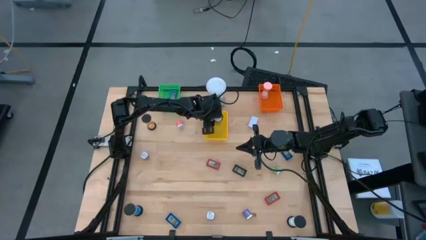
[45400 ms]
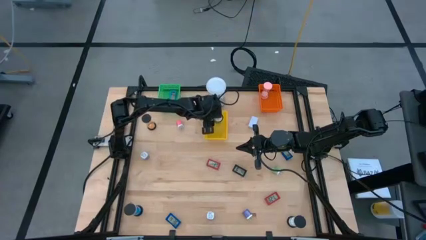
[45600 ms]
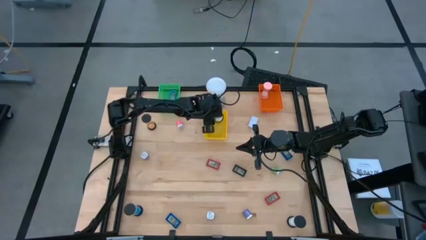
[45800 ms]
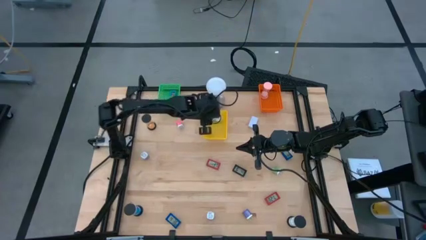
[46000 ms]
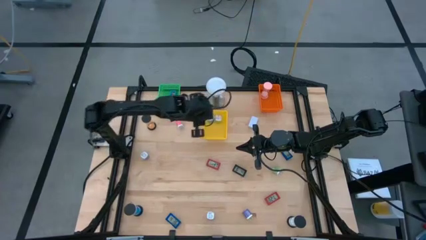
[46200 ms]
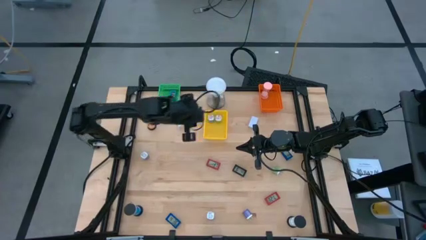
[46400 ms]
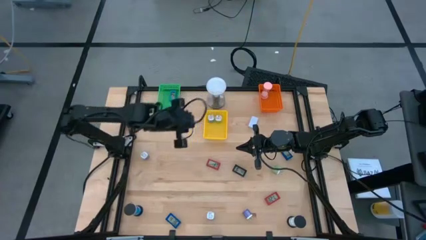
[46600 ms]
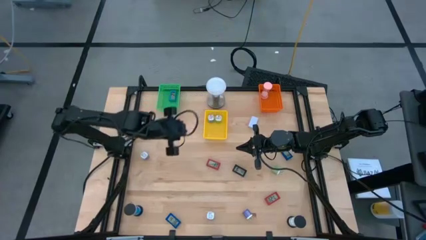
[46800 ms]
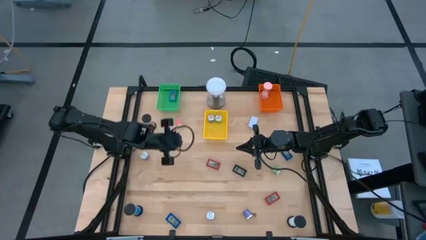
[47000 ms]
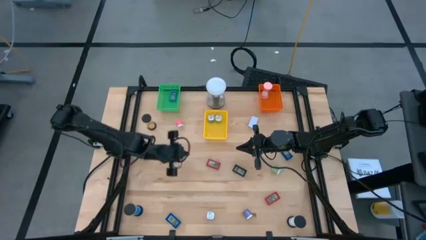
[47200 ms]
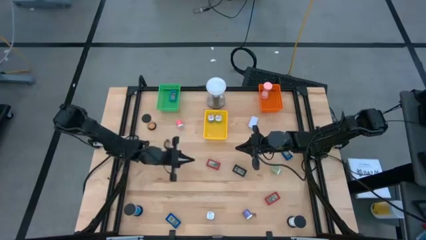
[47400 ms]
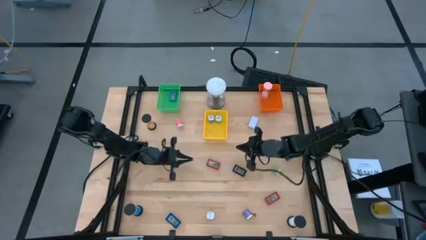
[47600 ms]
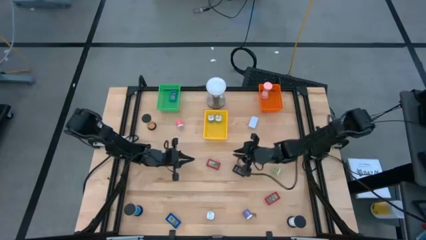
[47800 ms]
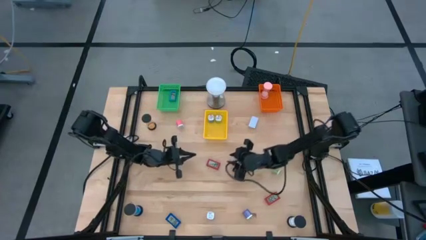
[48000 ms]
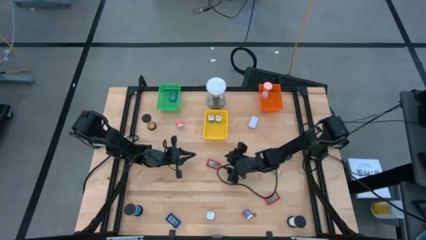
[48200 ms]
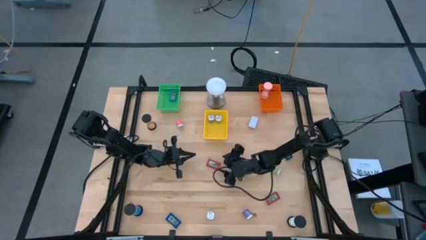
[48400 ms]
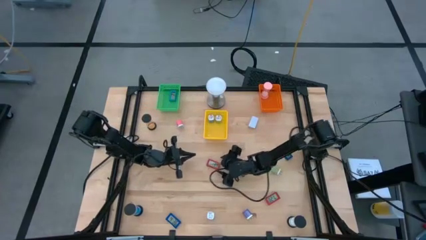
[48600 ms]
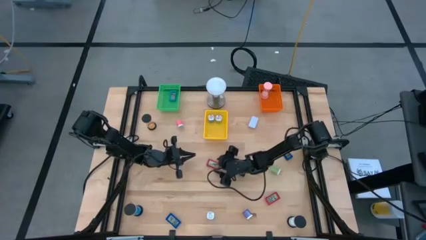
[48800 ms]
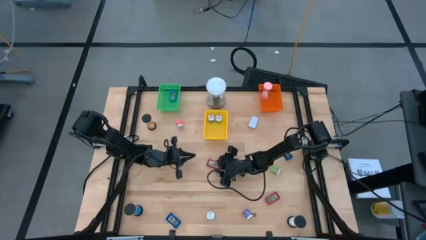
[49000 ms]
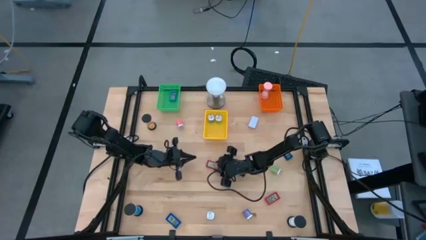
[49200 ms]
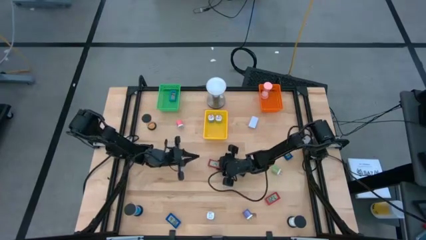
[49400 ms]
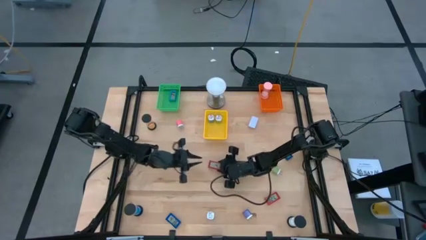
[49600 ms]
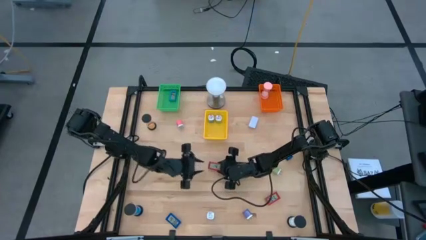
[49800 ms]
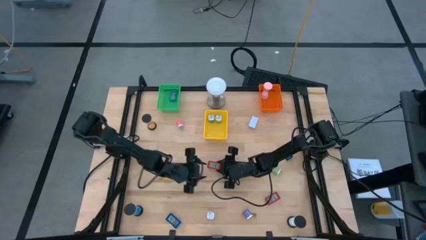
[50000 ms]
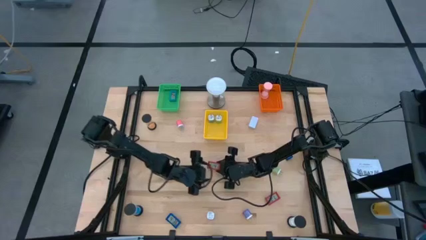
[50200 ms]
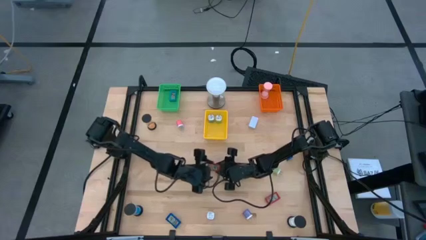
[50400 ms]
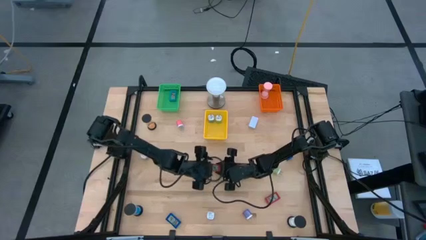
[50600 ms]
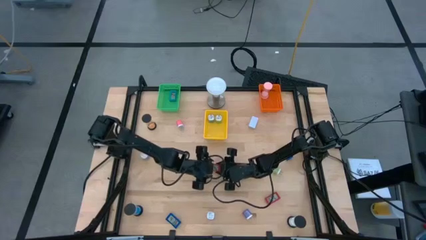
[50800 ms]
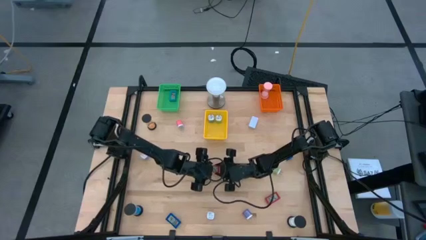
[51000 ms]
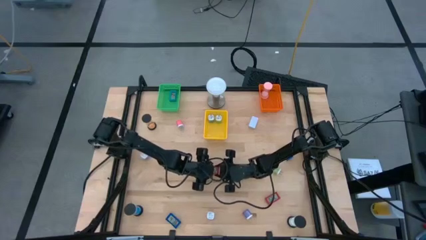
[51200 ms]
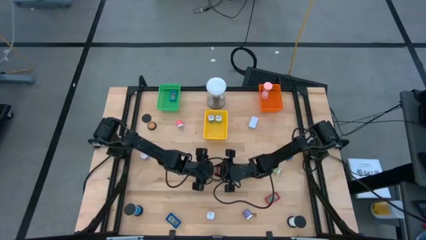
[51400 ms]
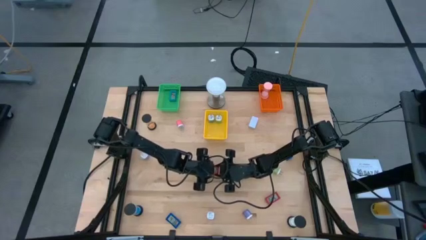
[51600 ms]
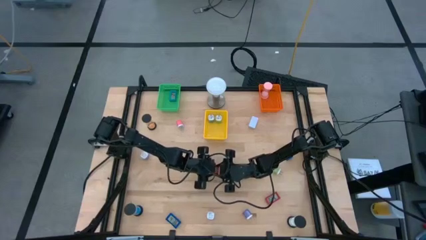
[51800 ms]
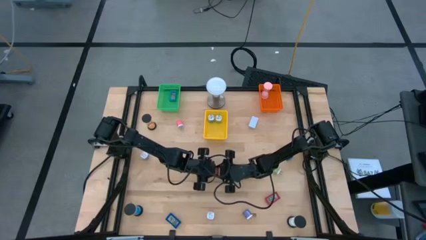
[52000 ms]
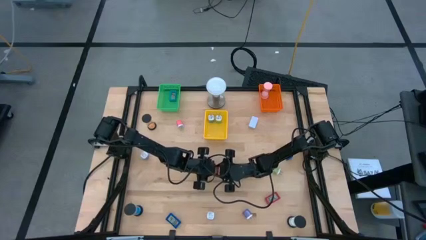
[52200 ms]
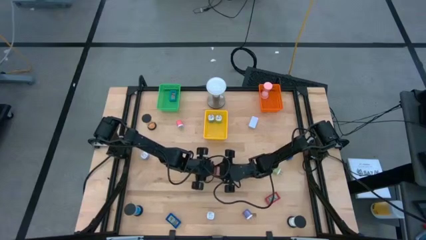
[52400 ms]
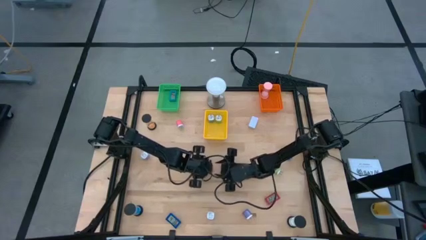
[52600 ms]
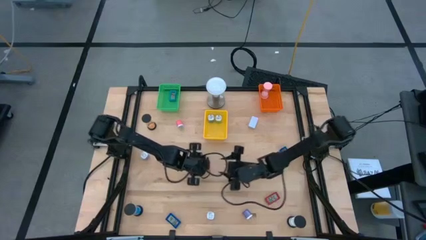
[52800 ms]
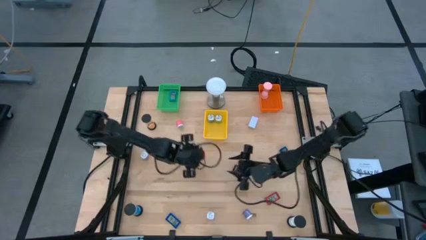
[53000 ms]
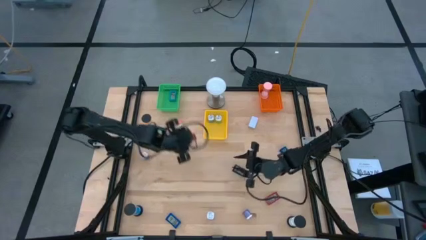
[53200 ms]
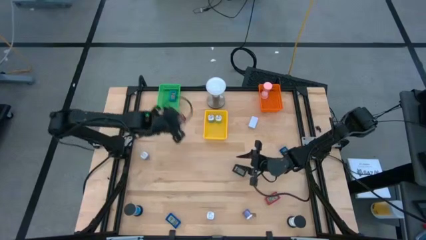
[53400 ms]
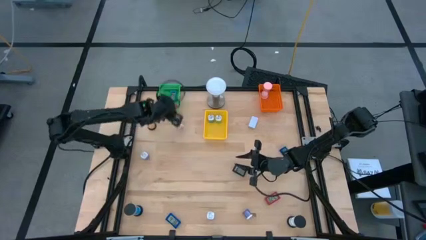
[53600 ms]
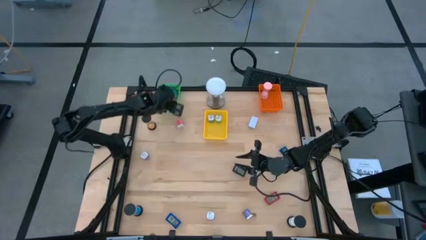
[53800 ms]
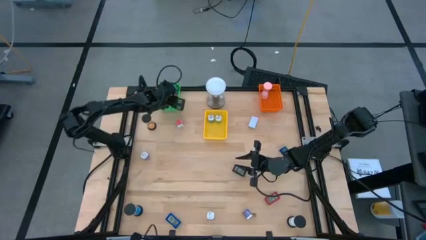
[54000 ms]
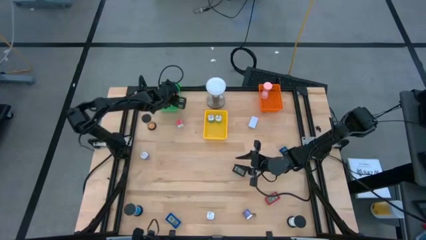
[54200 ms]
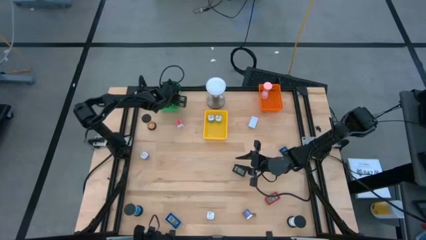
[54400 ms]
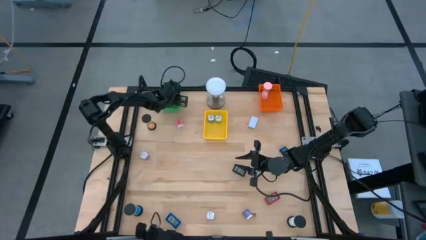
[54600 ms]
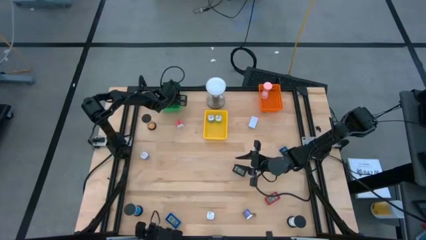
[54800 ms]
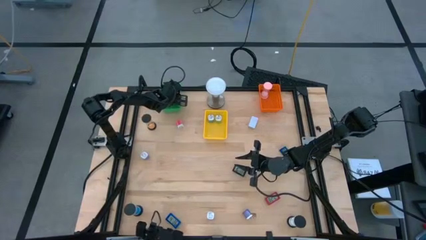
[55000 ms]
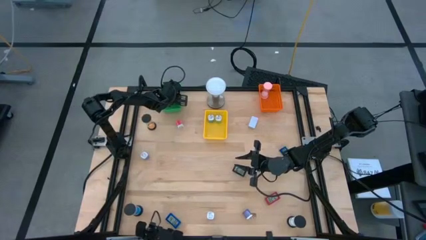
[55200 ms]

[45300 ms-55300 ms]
Task: Pick & Place Office items
Put the left red digital clock into the green bin

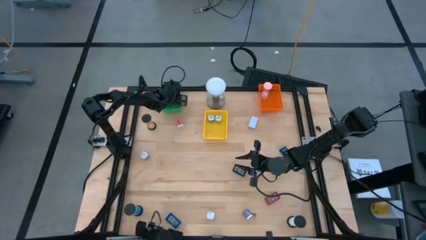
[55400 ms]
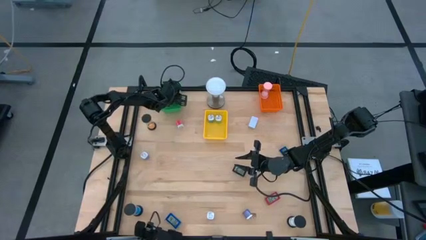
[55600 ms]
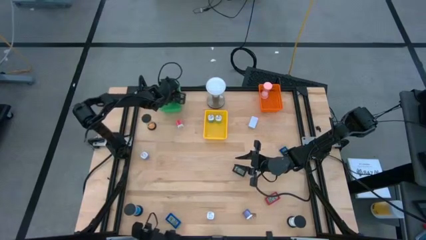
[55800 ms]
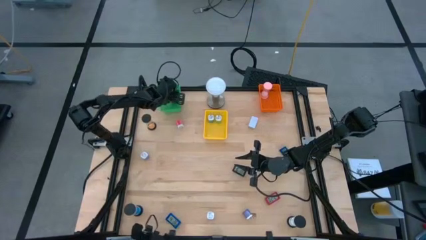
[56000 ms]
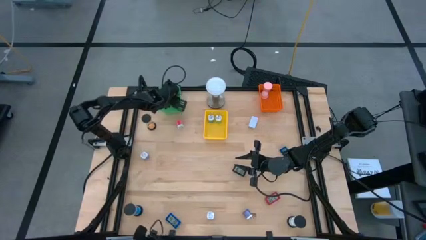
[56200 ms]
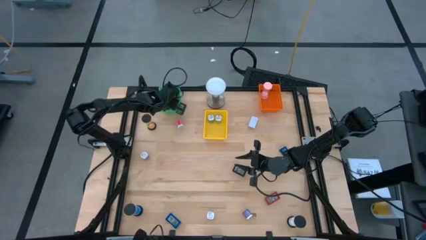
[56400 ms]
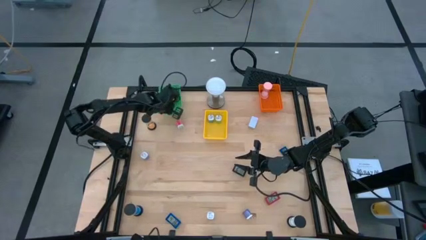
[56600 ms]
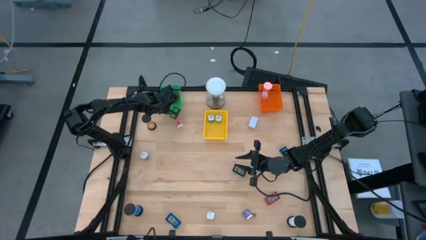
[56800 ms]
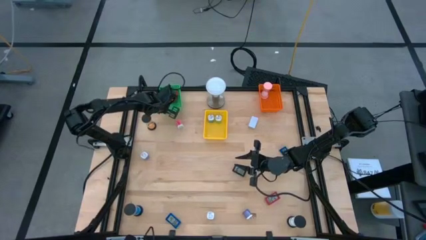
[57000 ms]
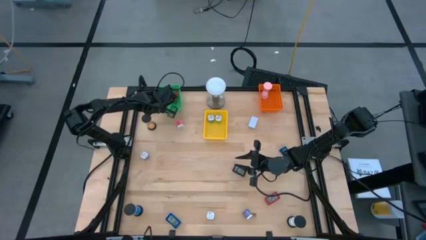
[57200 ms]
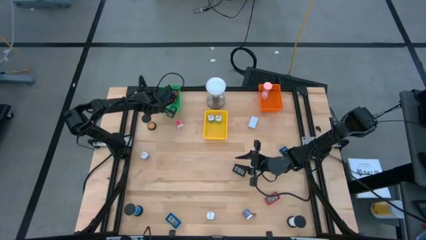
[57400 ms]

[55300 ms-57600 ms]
Adjust the green bin
